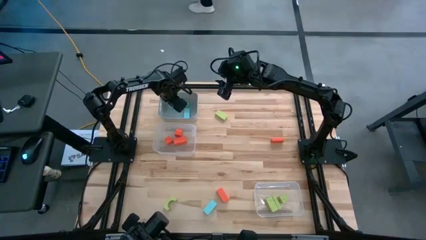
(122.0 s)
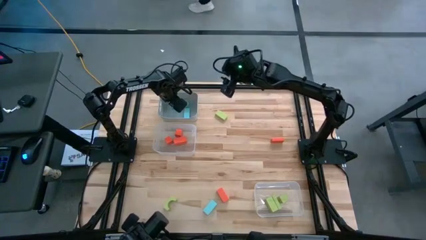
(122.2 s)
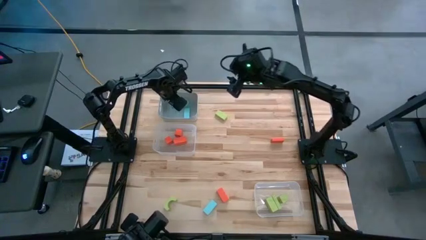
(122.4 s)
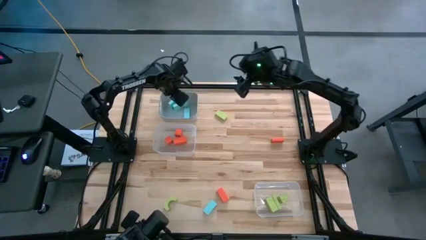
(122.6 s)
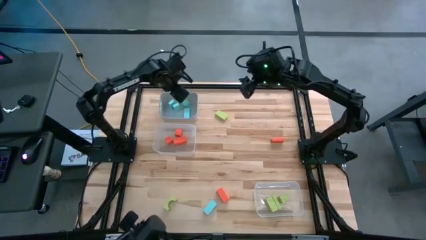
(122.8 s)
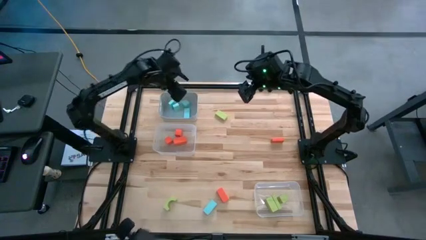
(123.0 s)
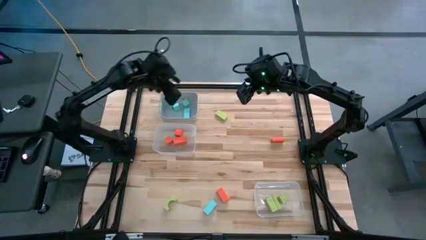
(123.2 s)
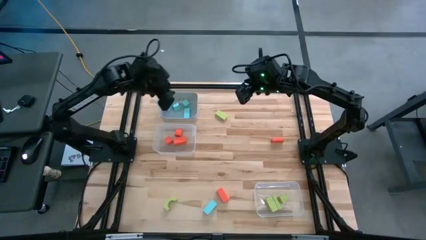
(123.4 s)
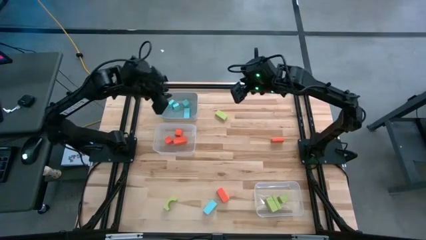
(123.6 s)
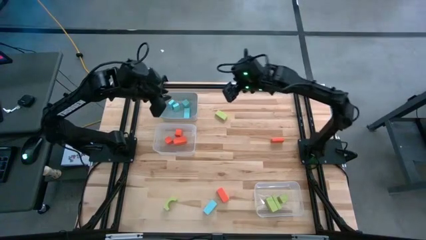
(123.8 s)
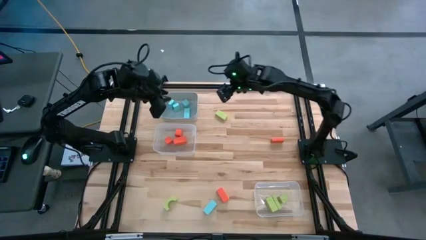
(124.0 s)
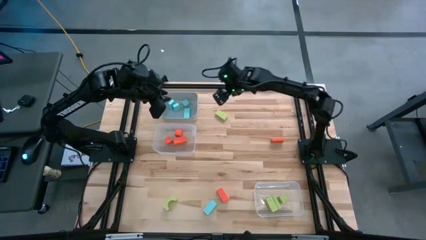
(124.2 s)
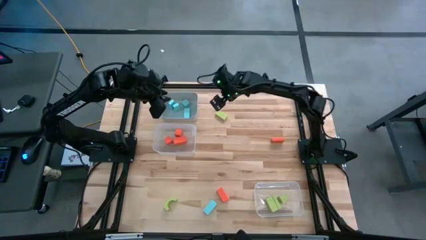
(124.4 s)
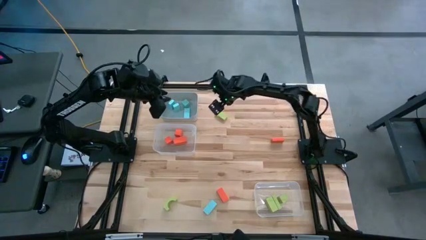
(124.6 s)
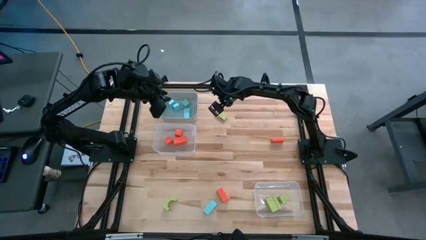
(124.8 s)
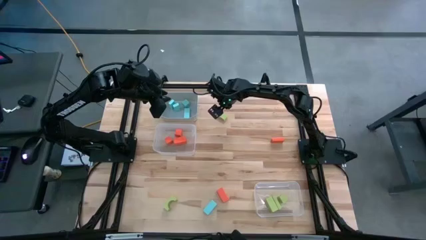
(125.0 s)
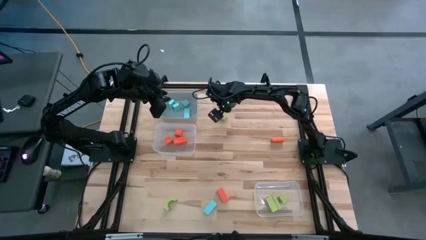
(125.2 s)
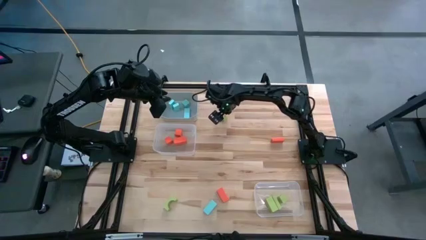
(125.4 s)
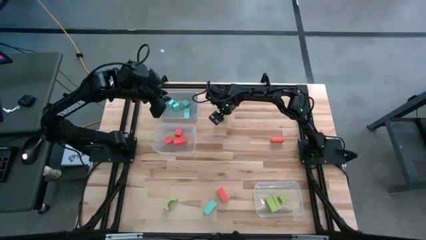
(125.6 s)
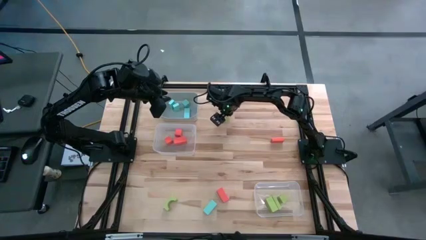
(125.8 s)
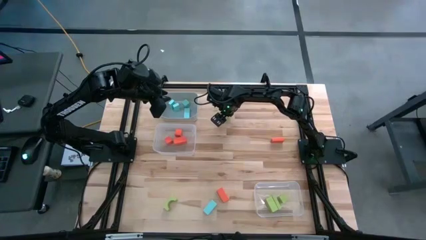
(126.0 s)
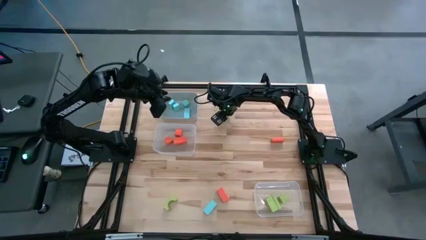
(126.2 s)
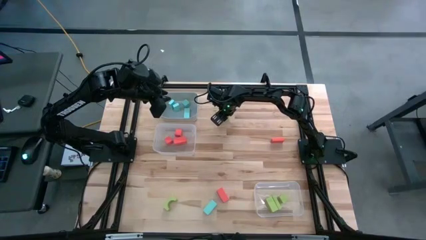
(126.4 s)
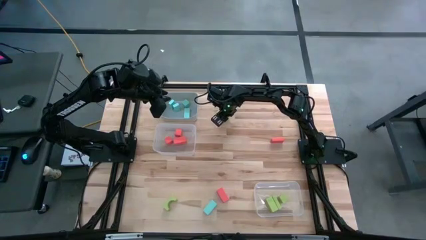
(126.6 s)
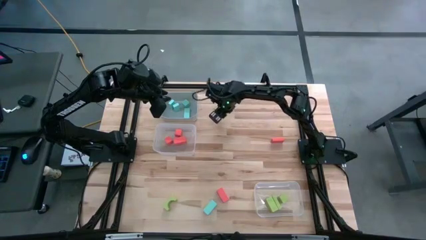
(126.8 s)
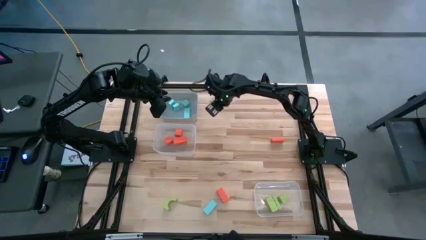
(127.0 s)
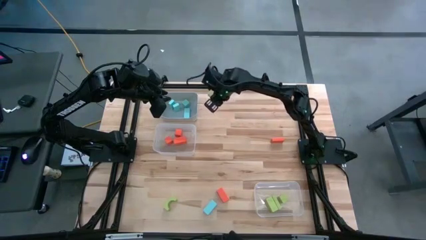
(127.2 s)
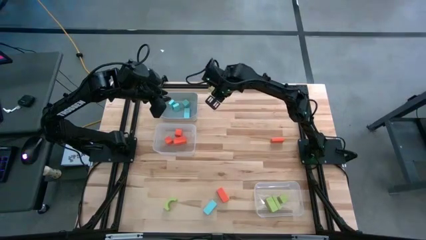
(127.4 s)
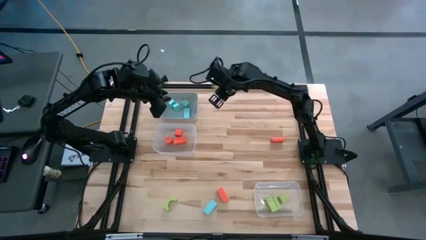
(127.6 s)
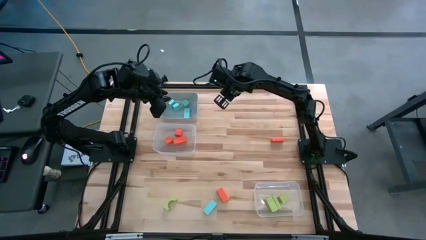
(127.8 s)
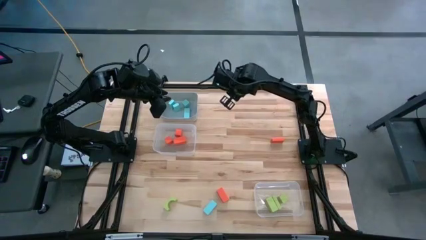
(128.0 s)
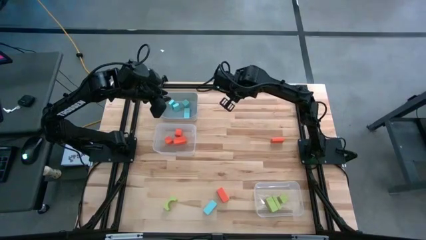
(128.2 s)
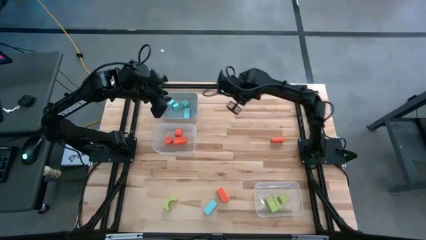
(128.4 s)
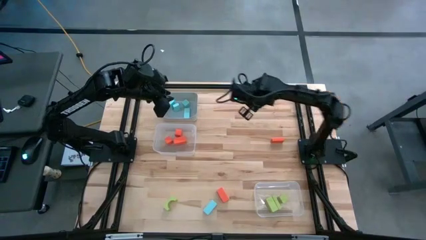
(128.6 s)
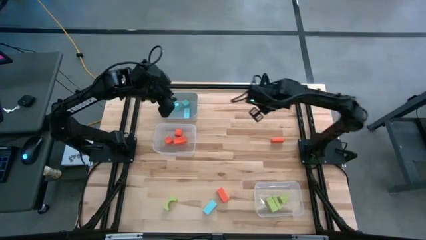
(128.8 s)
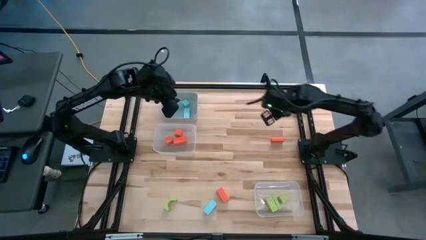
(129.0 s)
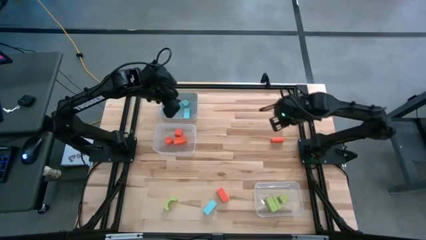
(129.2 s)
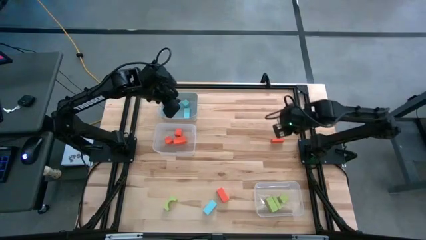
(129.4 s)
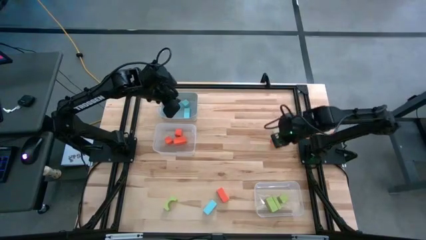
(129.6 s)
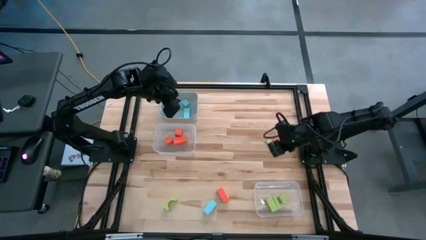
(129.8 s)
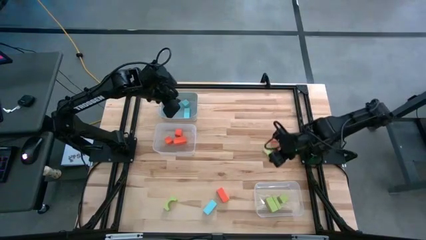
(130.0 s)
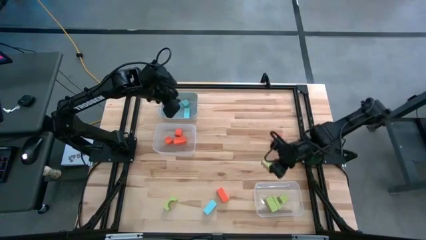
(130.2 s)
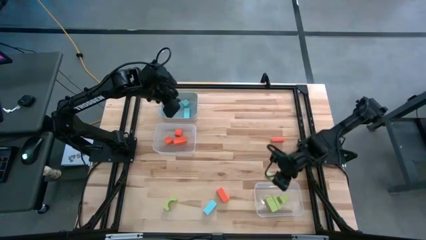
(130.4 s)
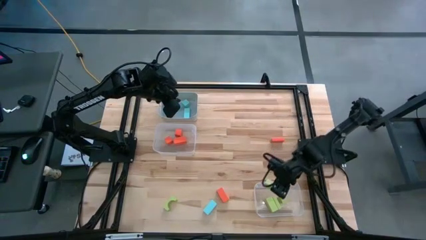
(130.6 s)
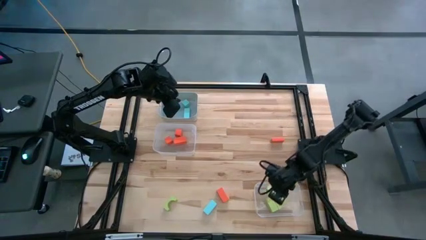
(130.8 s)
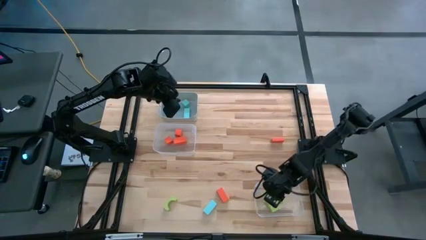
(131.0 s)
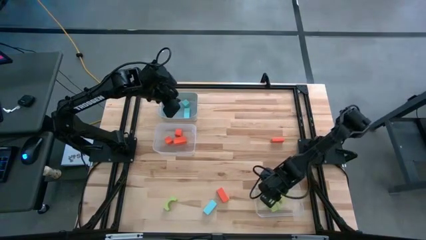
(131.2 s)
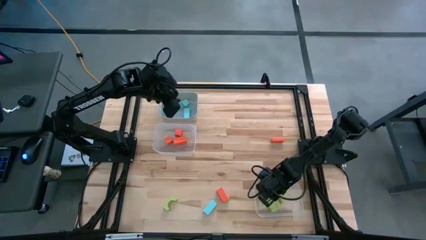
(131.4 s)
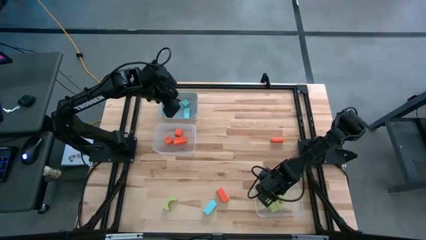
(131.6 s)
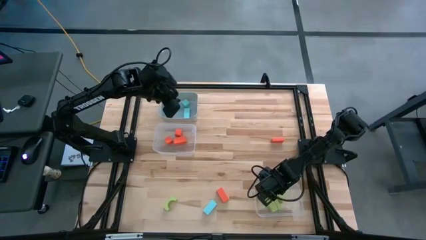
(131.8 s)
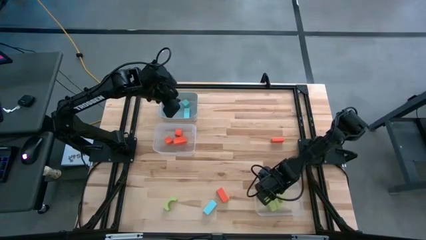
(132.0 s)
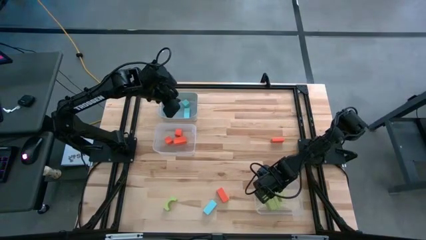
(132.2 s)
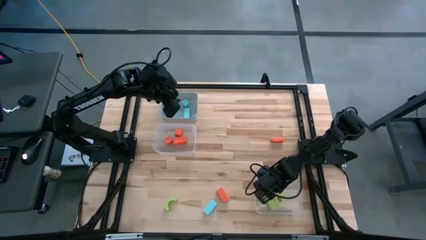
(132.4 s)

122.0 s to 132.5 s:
Task: Sort & place blocks by color
Put the green block into the bottom transparent bin

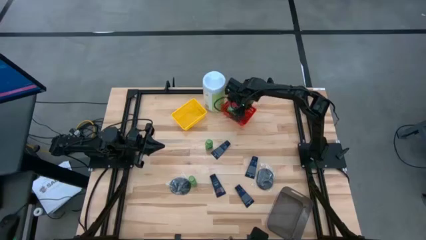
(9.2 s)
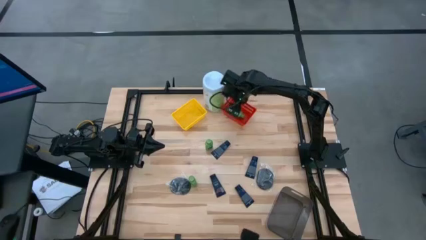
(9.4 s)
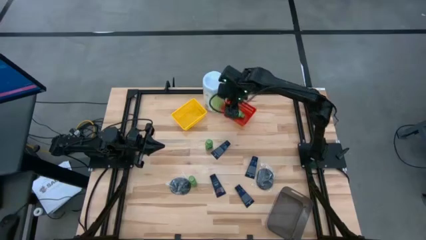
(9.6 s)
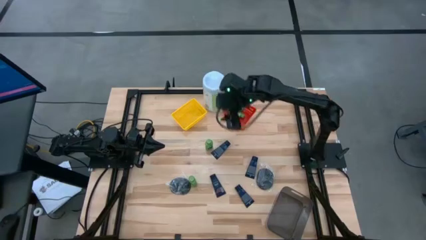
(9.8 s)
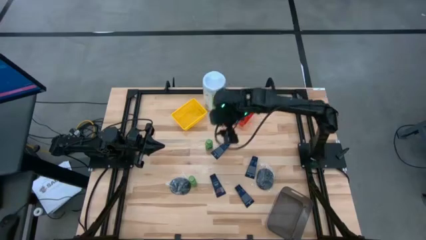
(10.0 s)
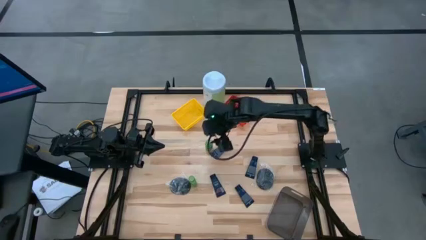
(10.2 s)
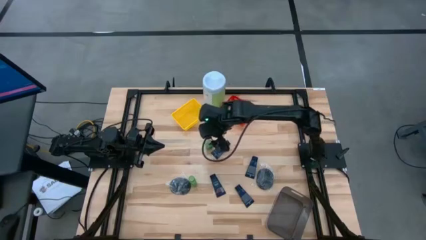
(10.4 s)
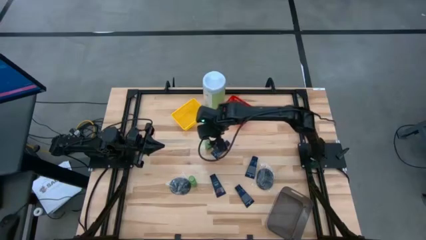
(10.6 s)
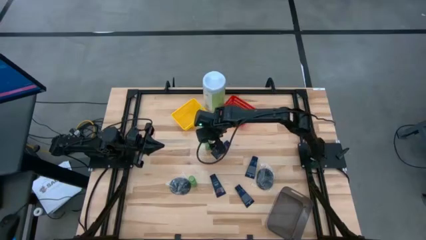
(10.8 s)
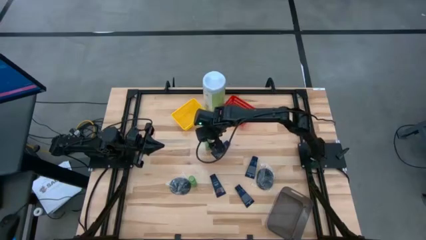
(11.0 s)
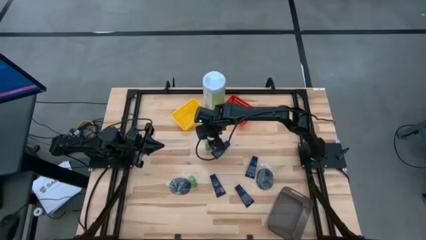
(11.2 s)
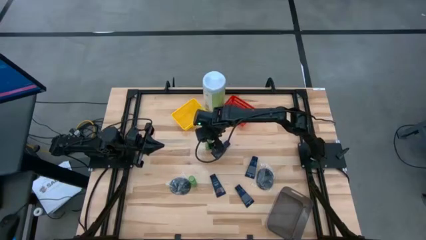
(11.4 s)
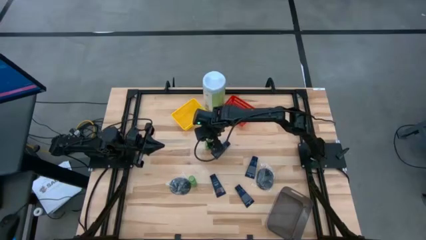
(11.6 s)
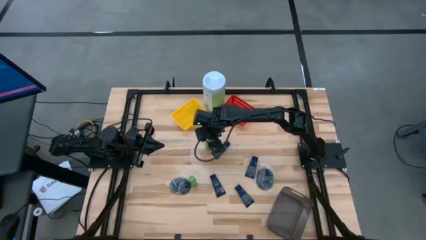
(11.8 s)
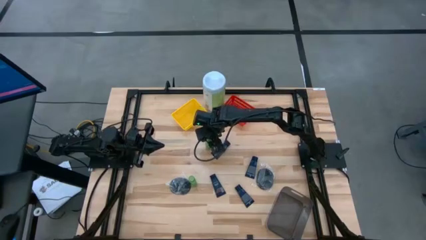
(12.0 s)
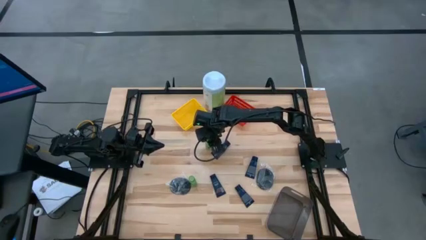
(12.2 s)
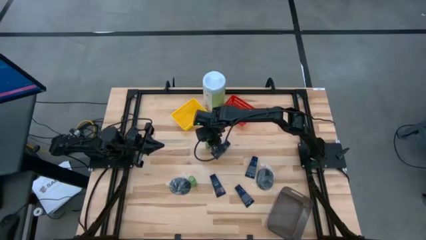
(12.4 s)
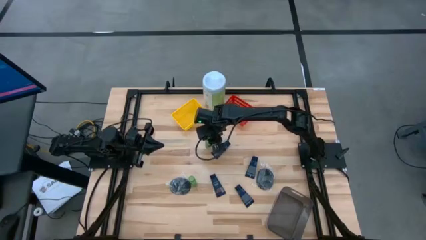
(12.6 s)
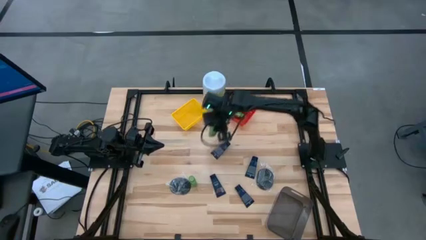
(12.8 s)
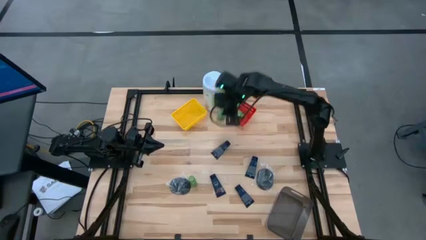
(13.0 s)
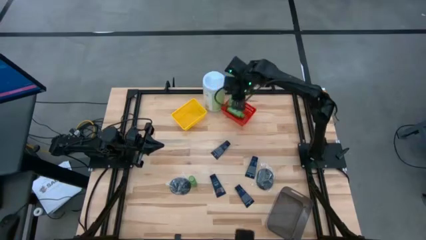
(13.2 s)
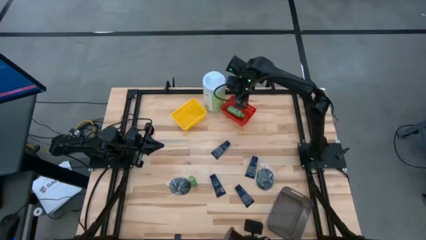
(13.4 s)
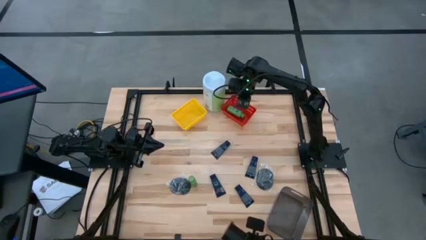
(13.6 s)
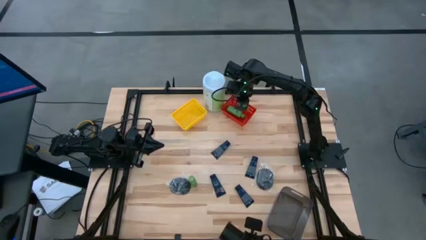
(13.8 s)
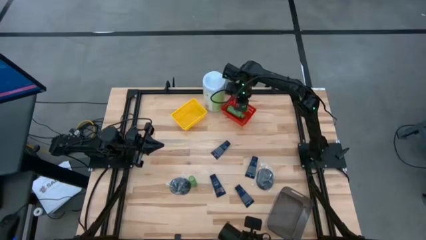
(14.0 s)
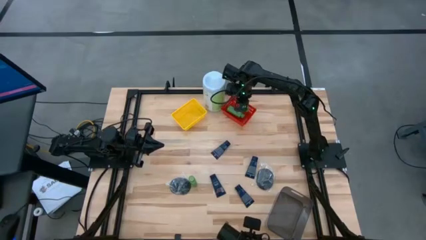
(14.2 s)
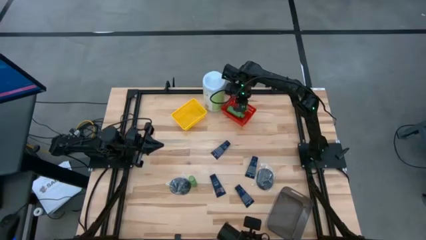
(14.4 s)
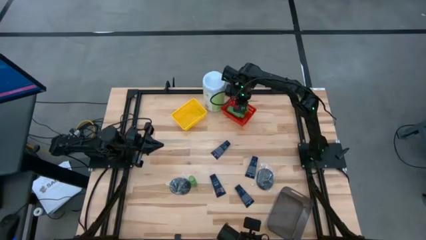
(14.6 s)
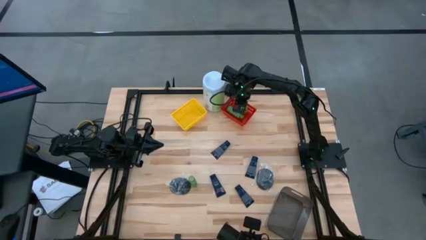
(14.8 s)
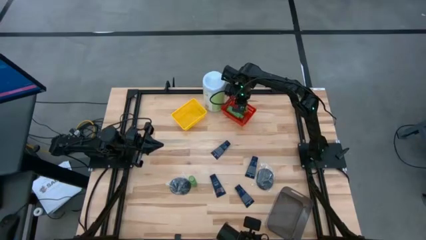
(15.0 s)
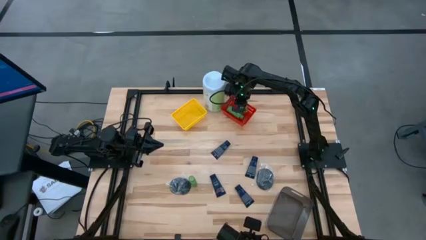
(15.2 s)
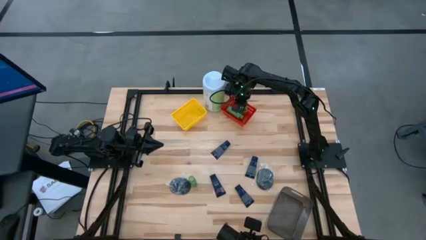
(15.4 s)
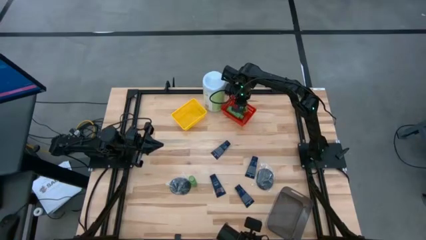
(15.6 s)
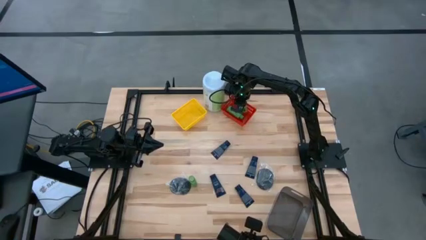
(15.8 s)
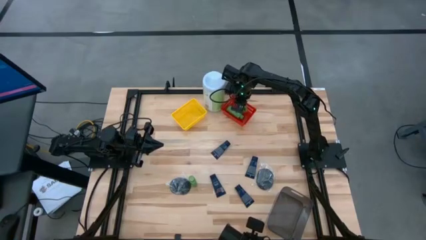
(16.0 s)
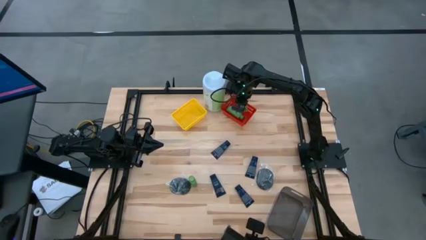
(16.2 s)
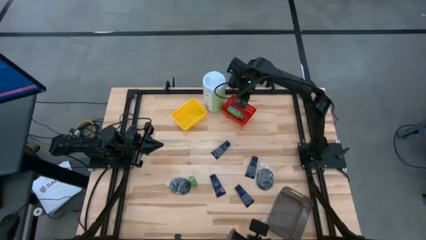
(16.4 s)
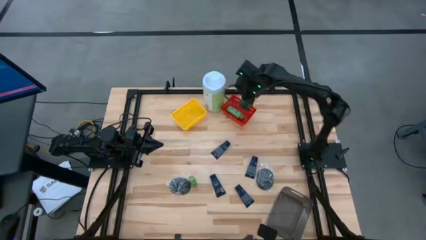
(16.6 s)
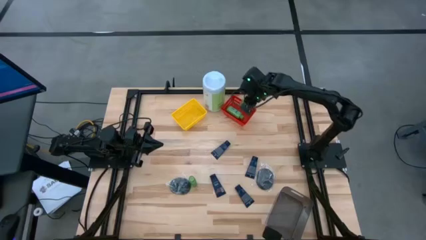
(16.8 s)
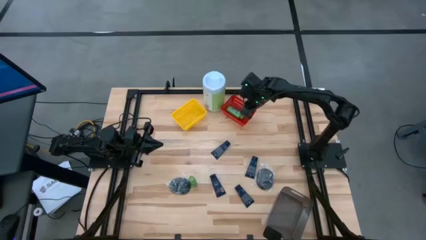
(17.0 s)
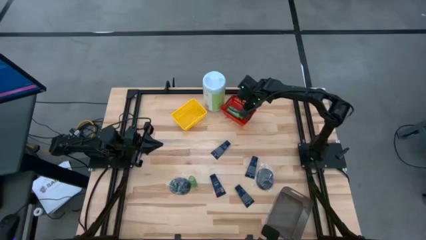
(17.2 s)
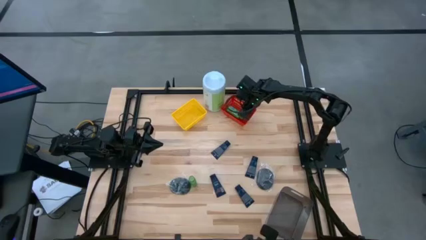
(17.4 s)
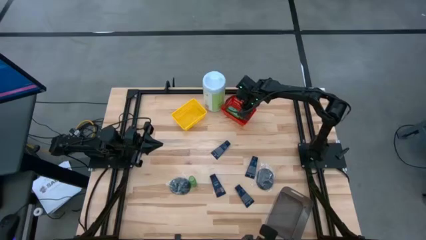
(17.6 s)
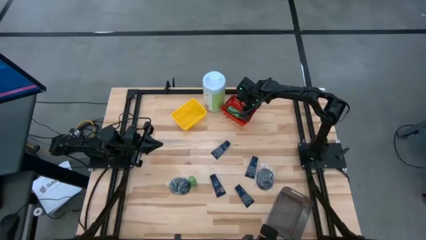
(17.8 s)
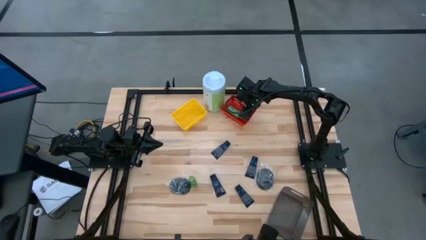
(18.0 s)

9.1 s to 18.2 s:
Task: Pick & Place Travel size toiletries
Put the green shampoo bottle in the red bin
